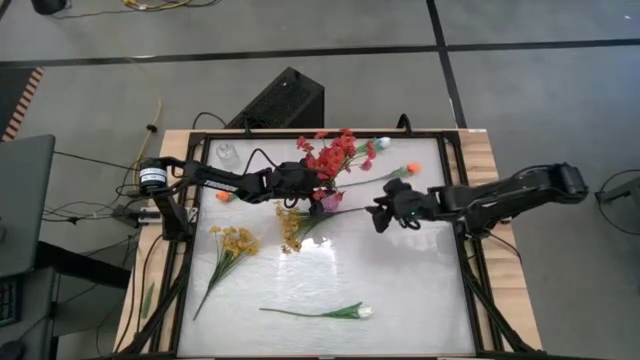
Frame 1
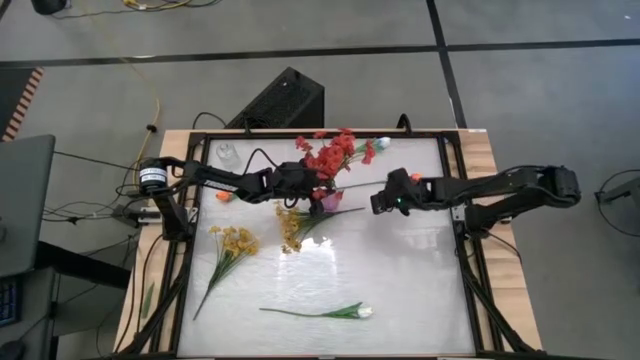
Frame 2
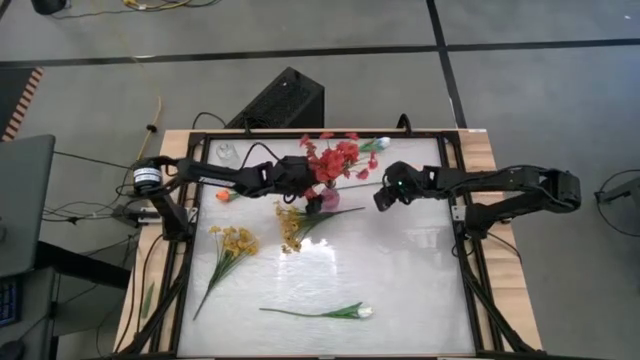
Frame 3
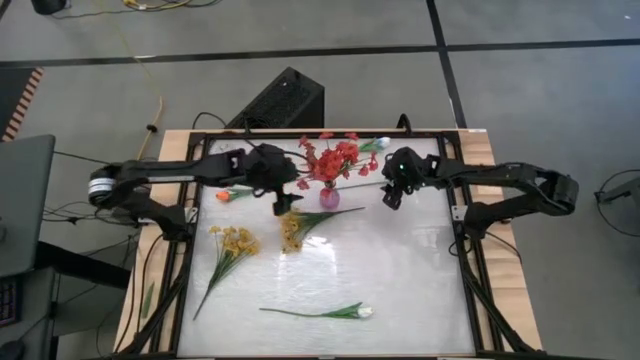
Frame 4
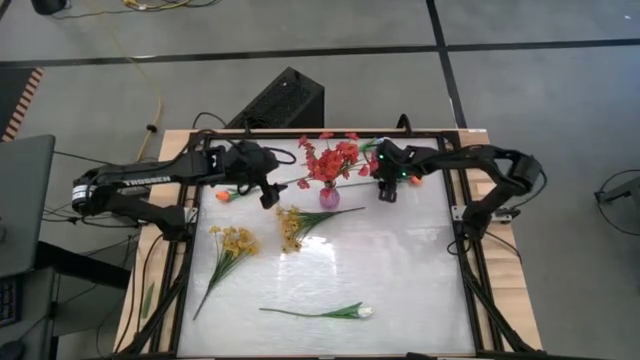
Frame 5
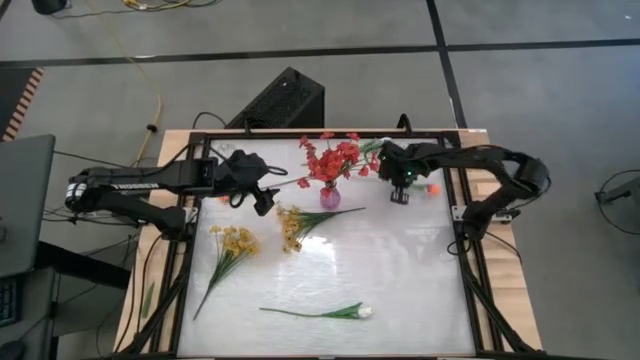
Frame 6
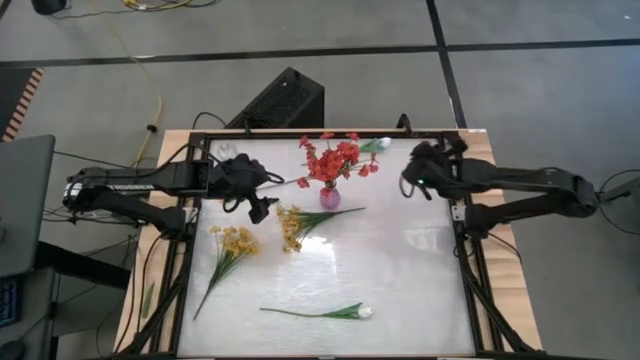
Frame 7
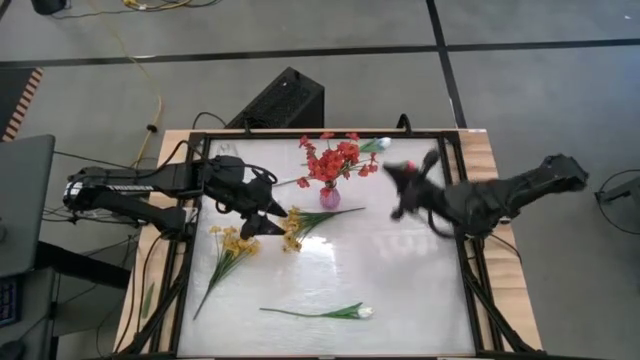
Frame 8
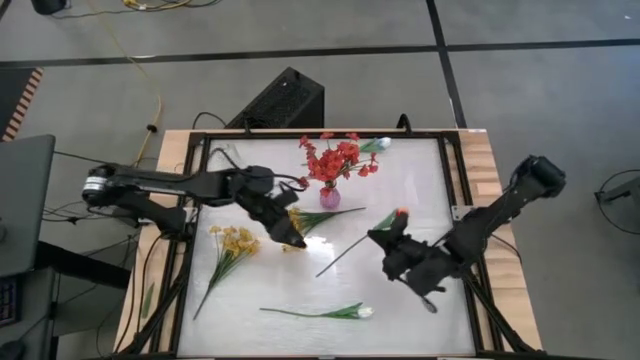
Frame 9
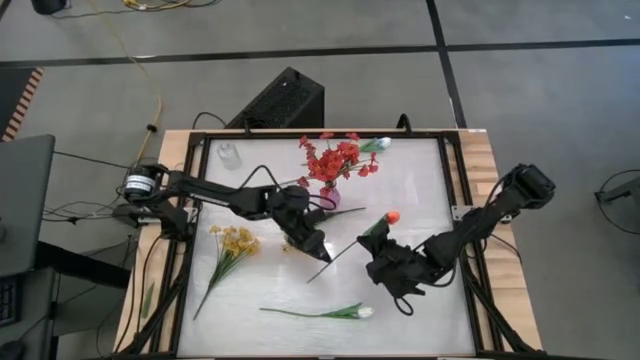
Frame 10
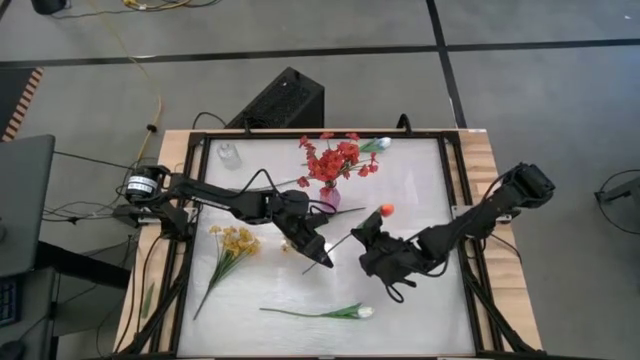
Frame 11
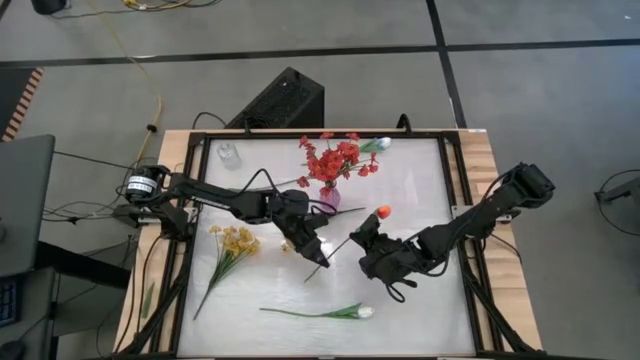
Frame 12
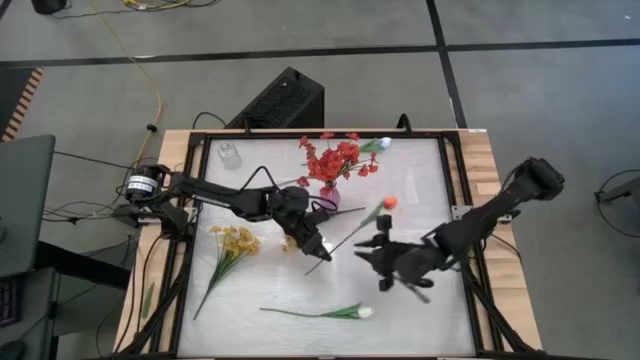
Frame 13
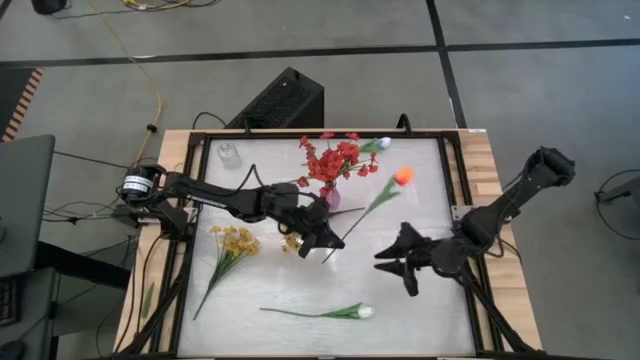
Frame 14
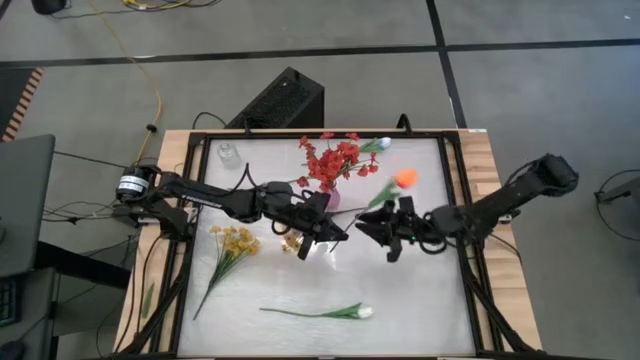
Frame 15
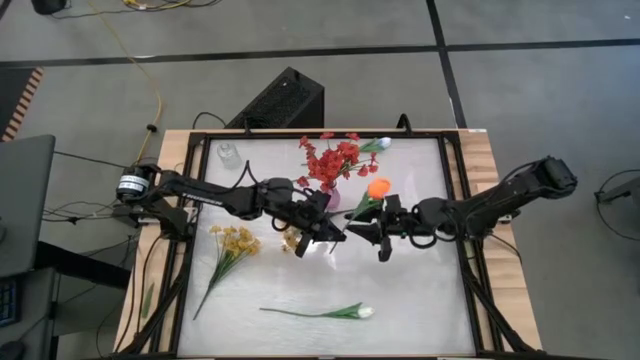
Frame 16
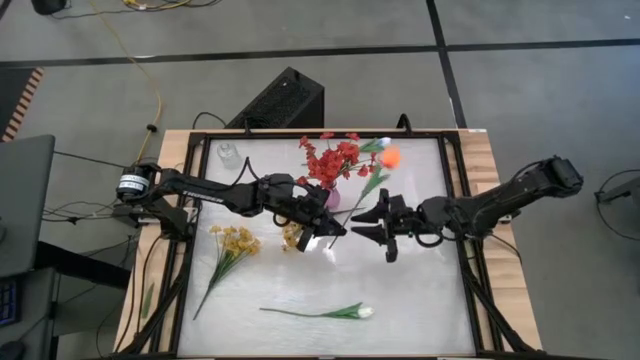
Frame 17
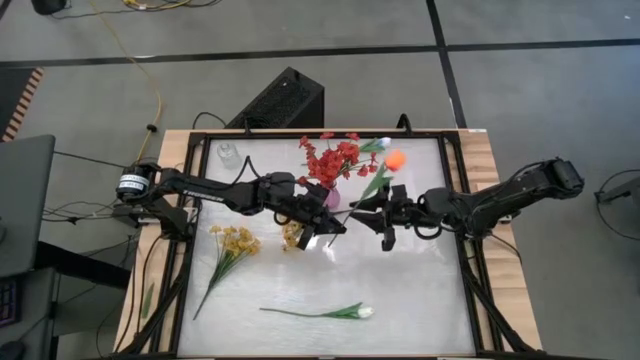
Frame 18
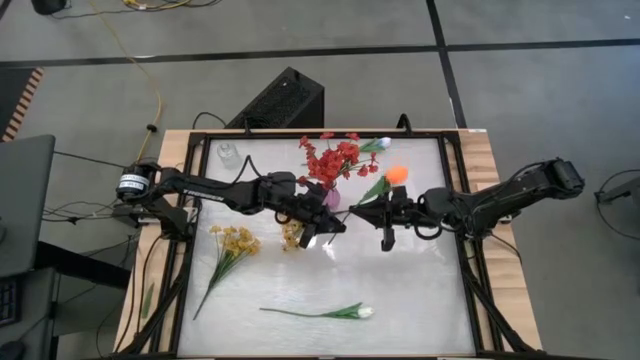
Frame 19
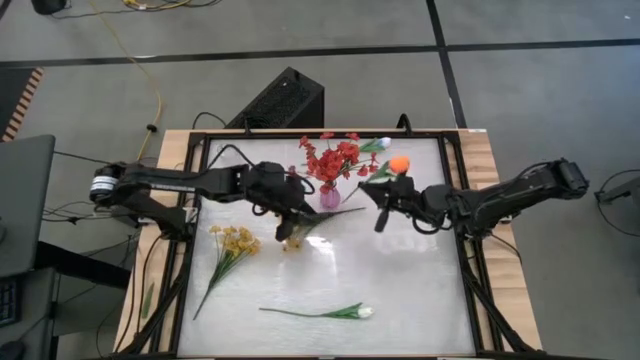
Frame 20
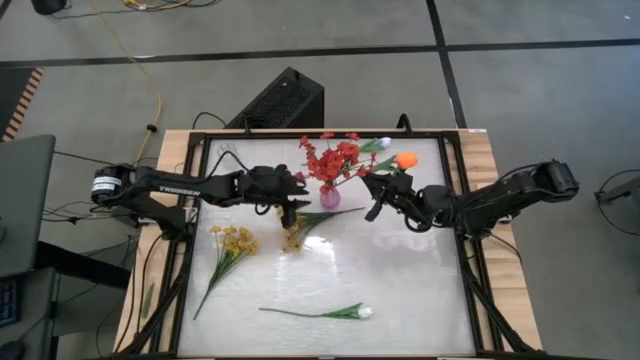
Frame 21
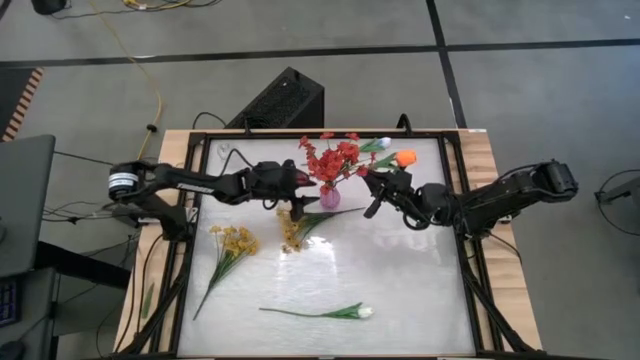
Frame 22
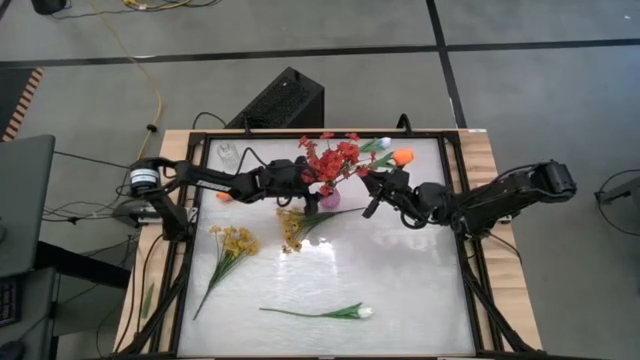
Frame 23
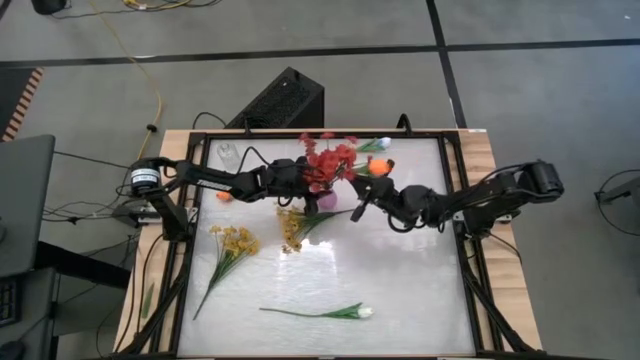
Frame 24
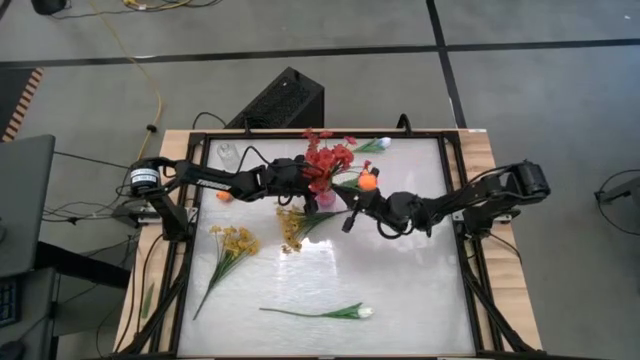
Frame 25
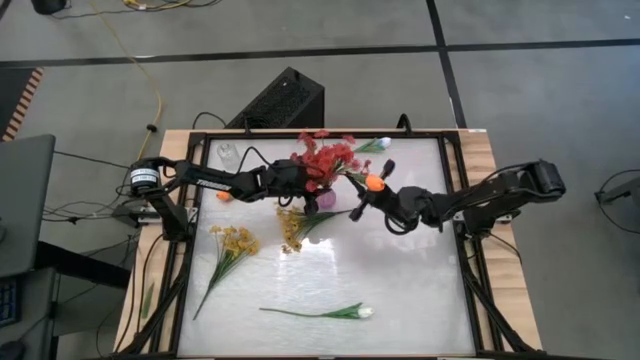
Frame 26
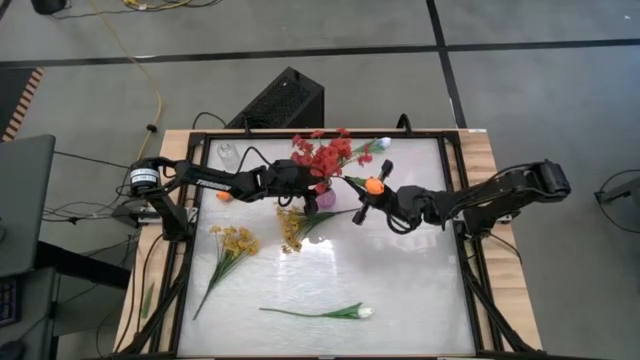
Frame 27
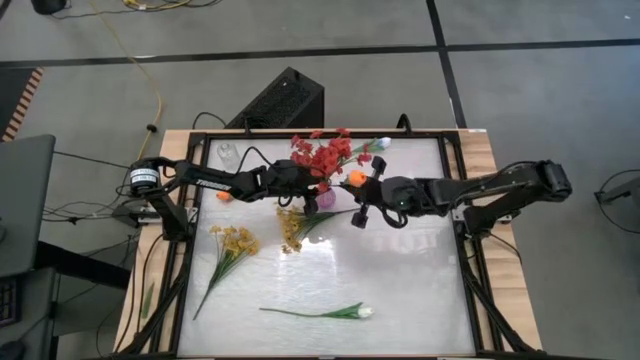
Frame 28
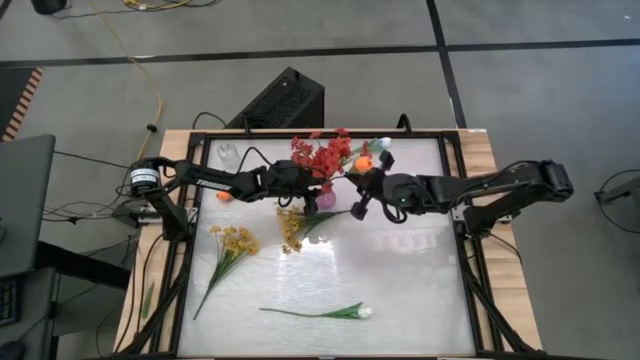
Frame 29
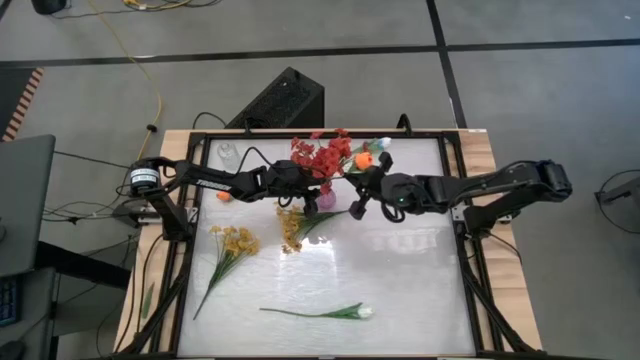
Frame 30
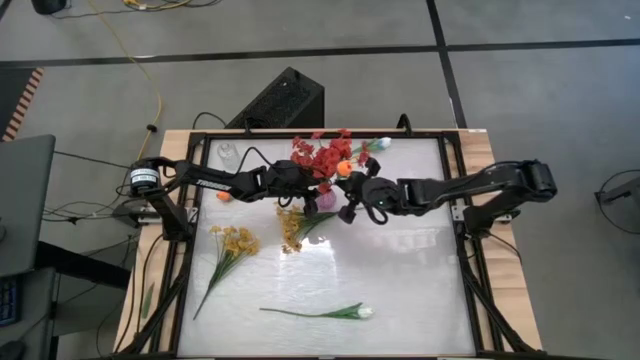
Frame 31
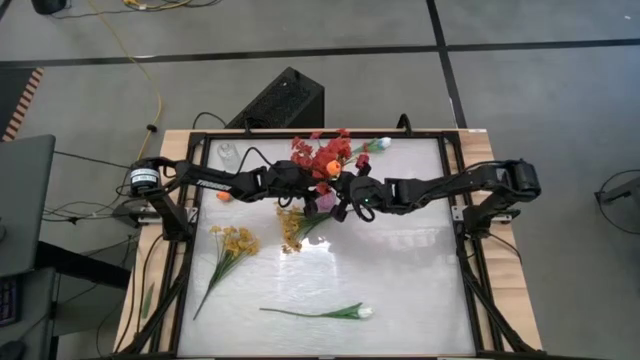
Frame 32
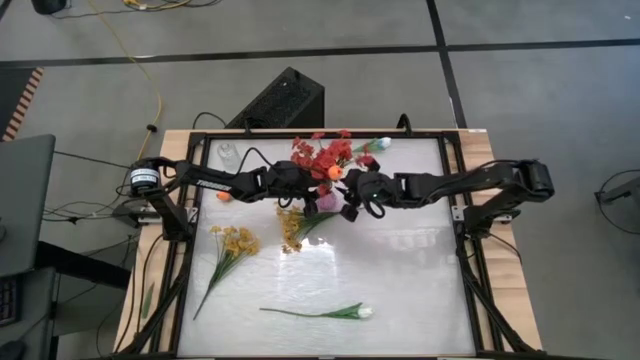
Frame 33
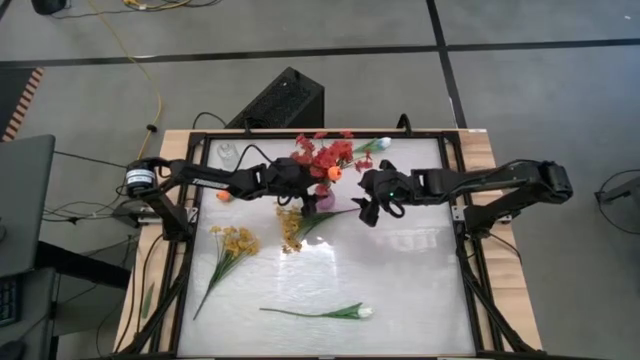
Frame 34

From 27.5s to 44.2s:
Task: Sort flowers into vase by color
Put the right orange tulip into the violet vase

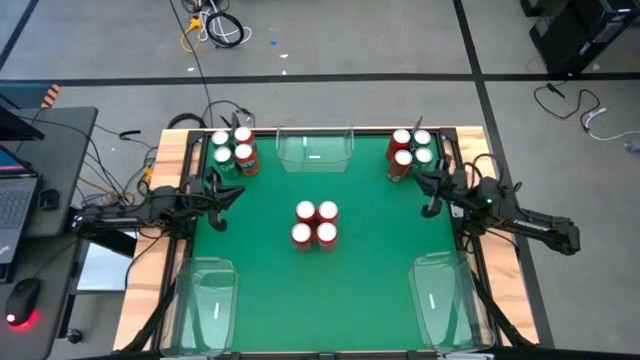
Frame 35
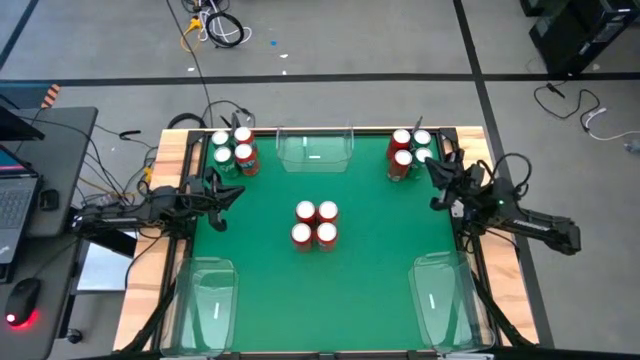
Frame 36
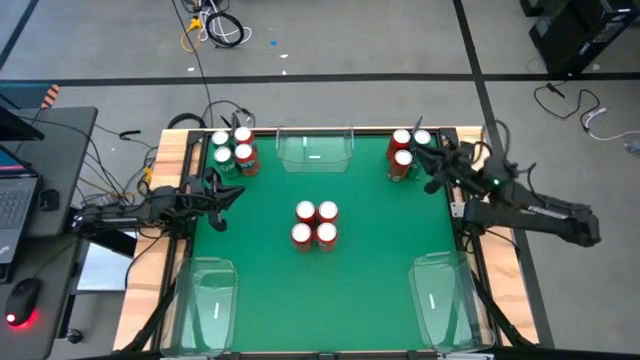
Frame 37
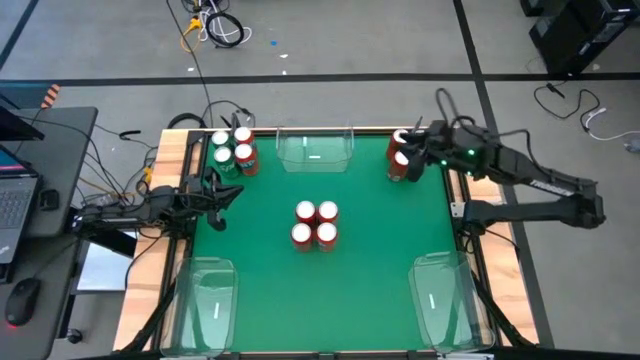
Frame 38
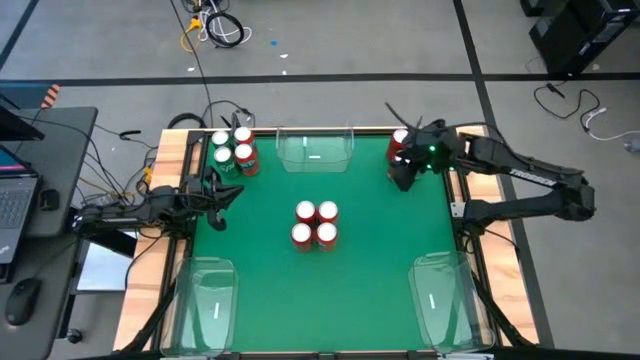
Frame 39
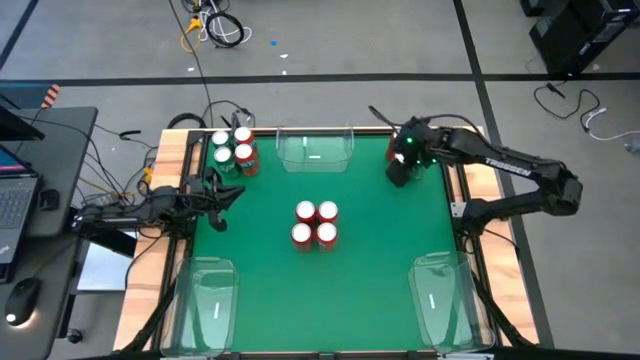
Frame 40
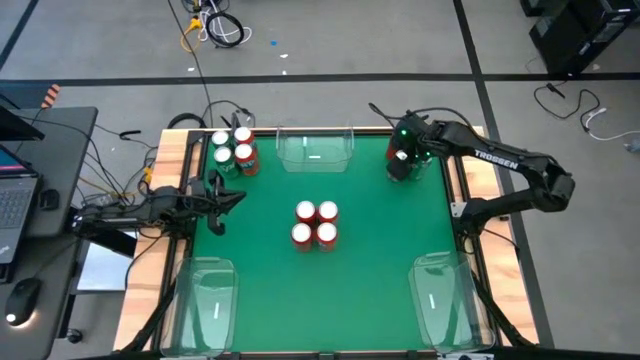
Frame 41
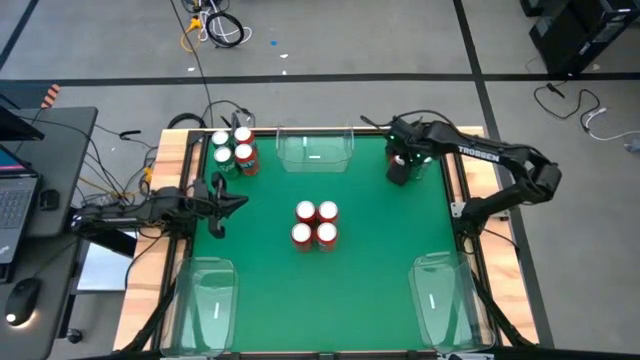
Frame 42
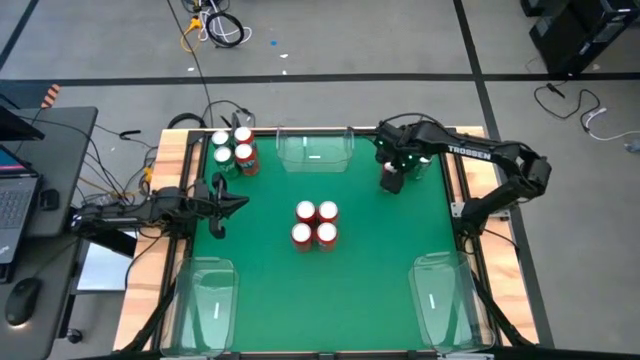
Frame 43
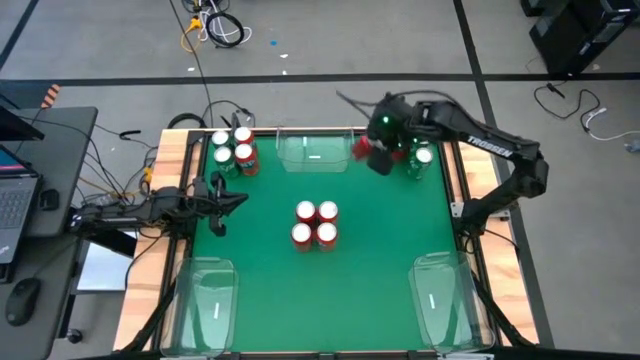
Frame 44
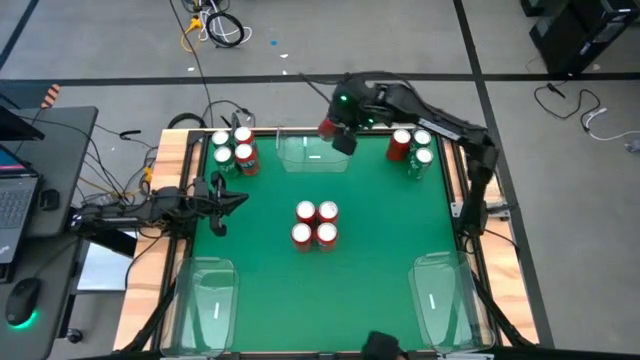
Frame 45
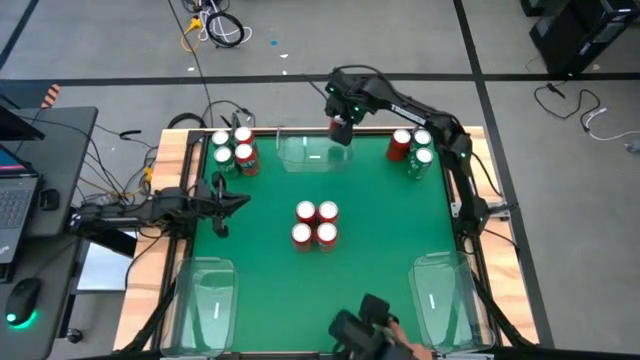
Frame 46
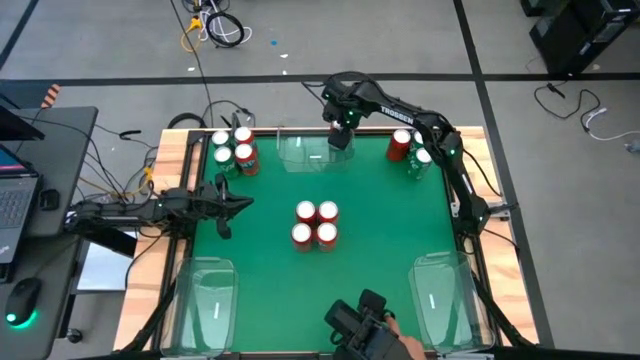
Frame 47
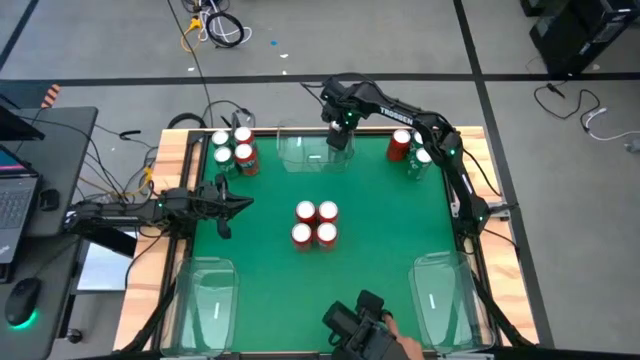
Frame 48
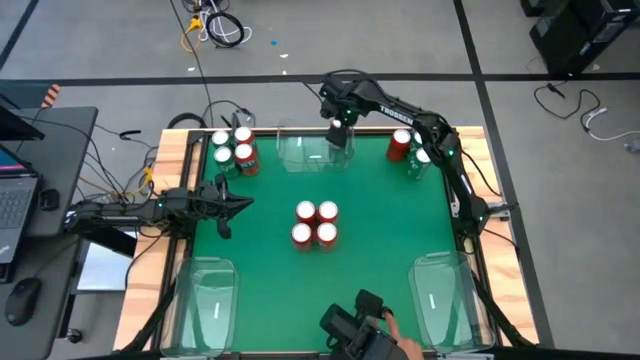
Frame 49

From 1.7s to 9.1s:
Task: Sort soda cans
Put the red-black soda can into the top transparent bin
